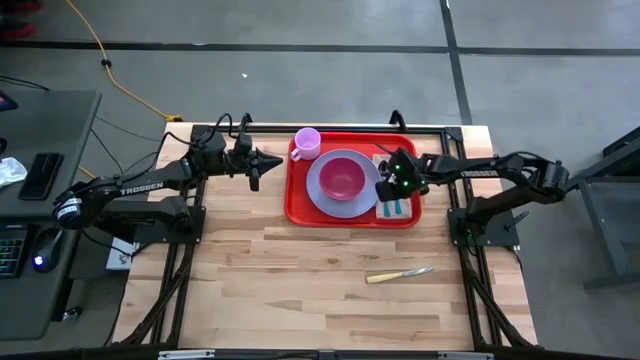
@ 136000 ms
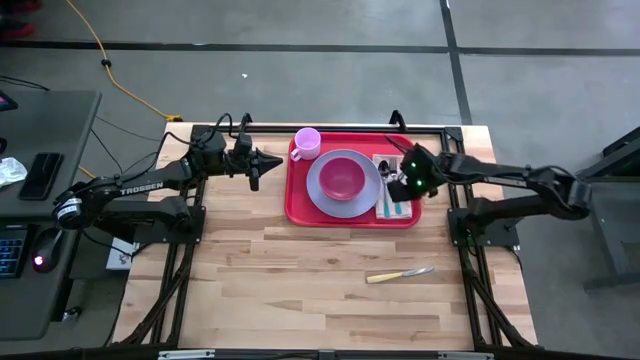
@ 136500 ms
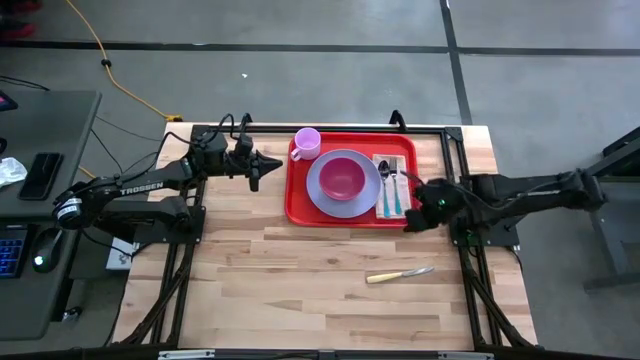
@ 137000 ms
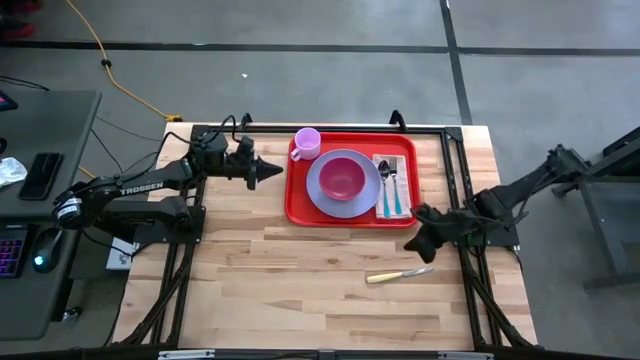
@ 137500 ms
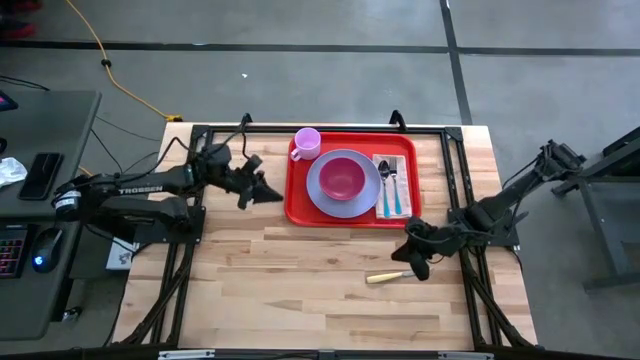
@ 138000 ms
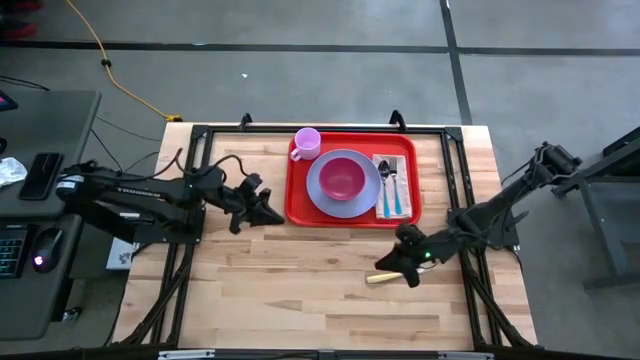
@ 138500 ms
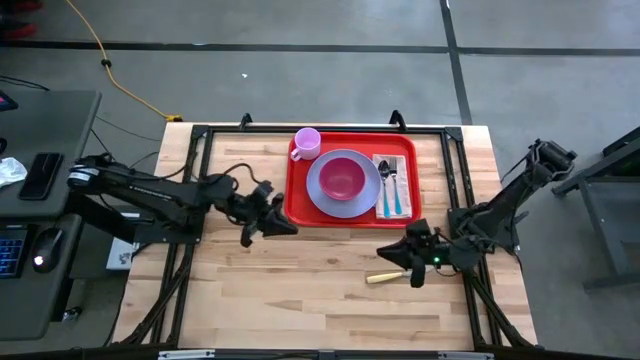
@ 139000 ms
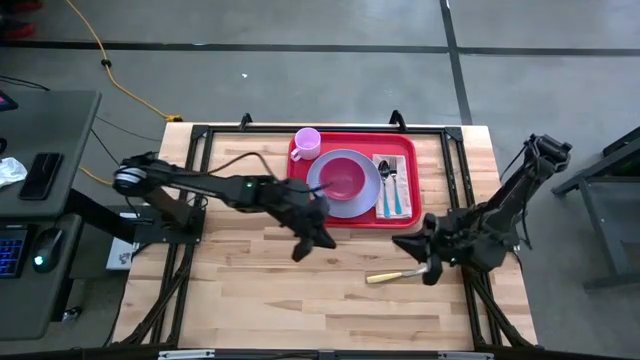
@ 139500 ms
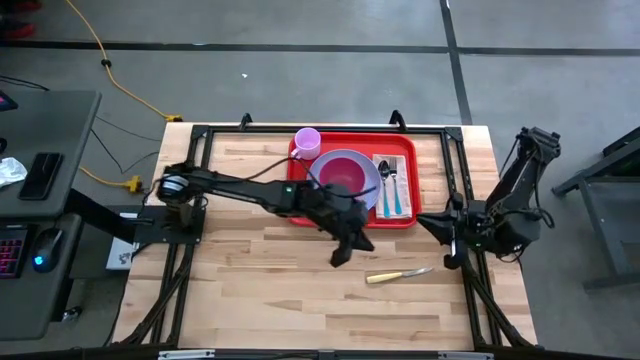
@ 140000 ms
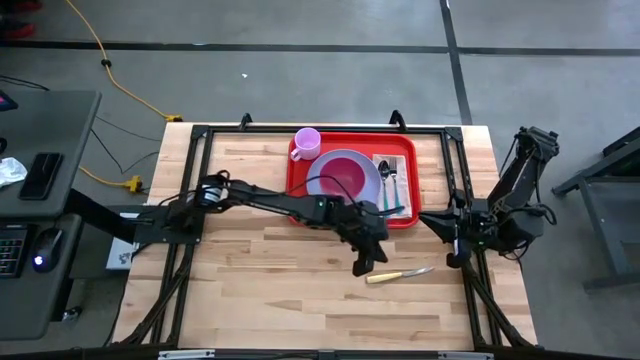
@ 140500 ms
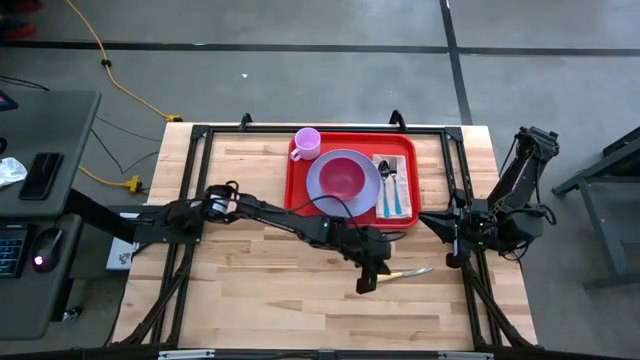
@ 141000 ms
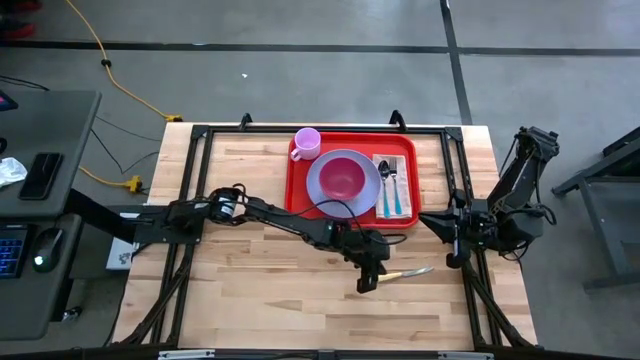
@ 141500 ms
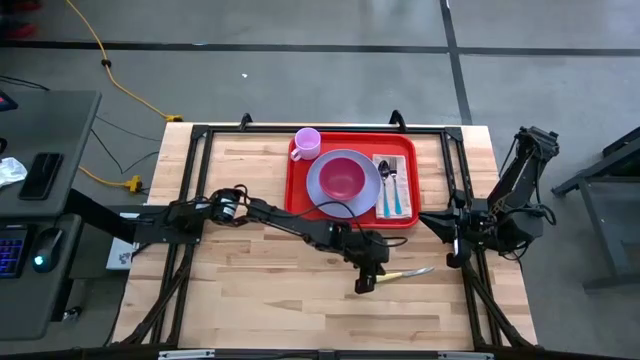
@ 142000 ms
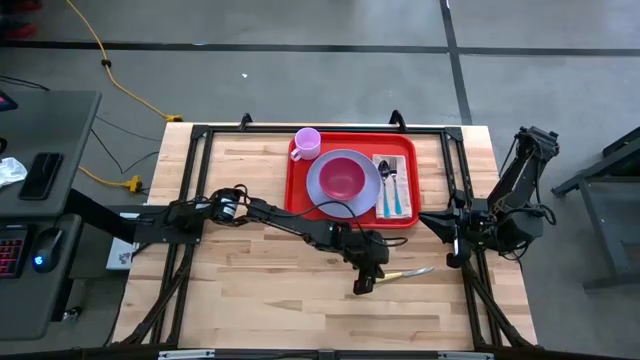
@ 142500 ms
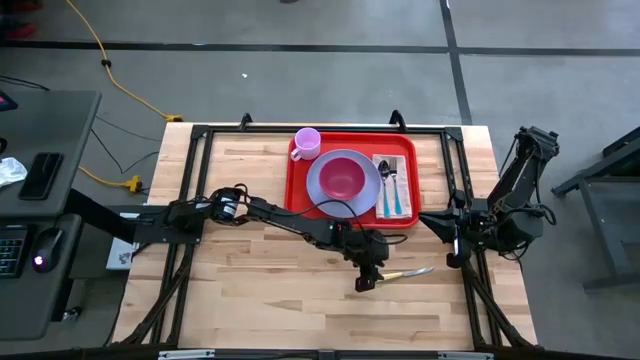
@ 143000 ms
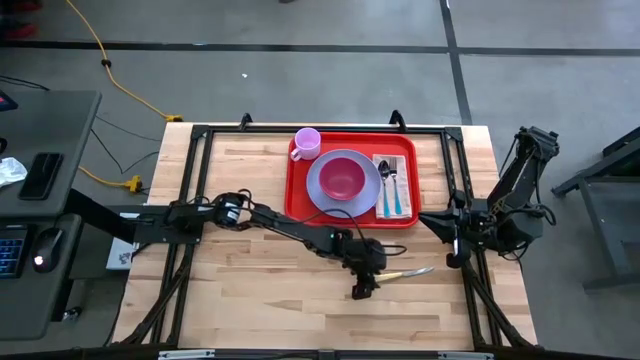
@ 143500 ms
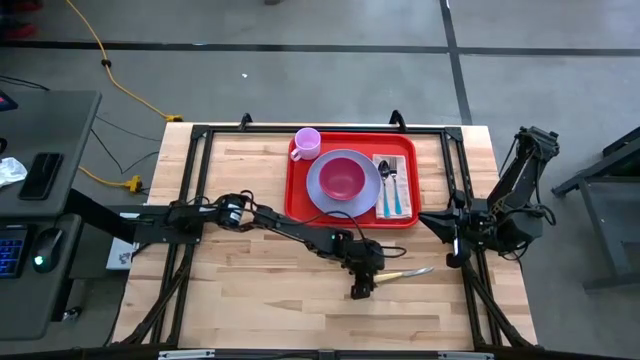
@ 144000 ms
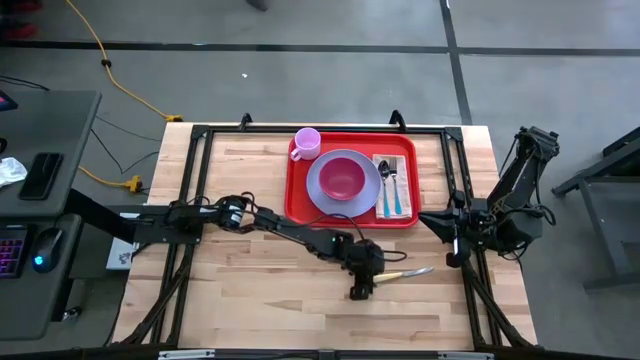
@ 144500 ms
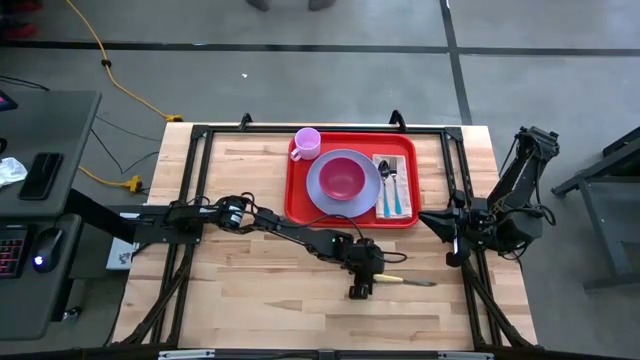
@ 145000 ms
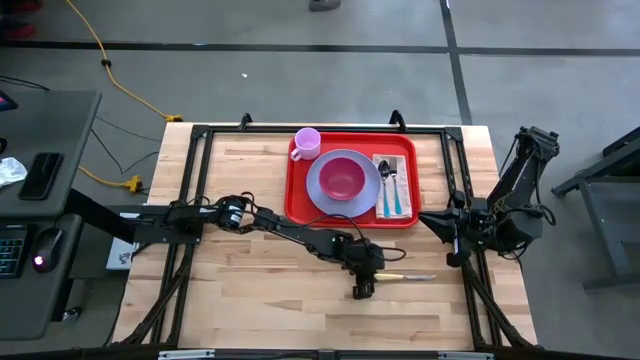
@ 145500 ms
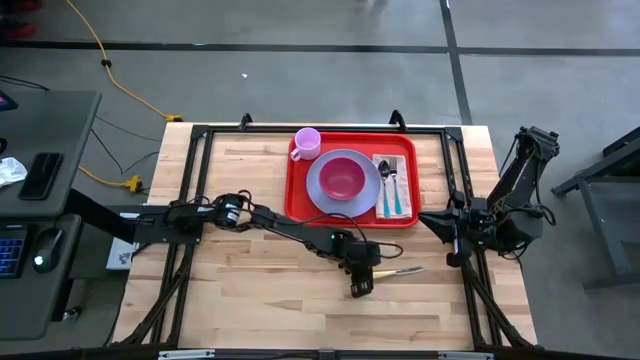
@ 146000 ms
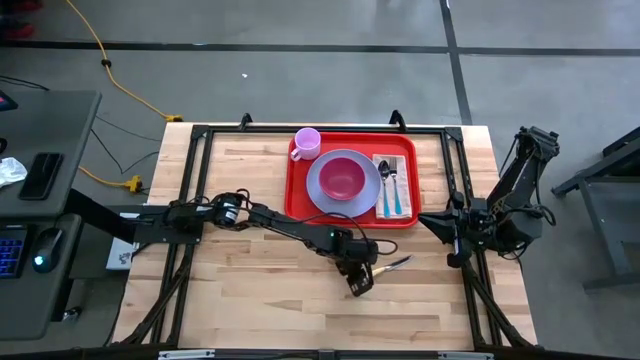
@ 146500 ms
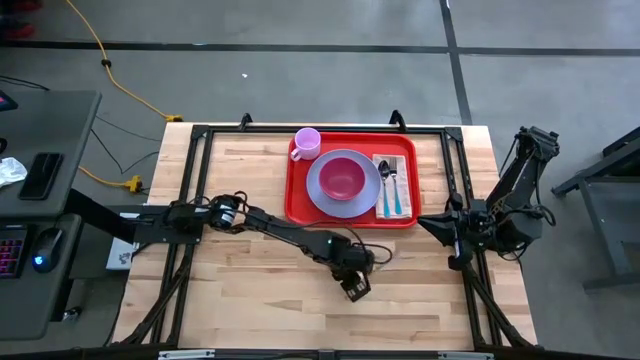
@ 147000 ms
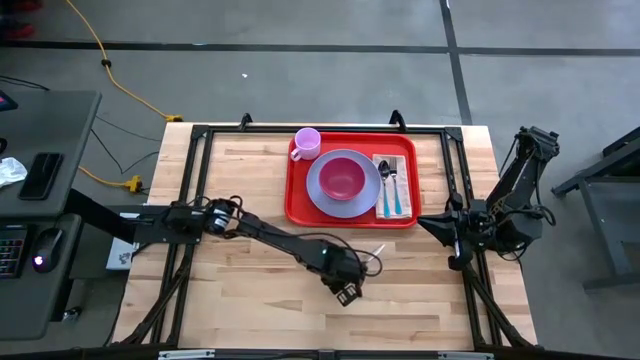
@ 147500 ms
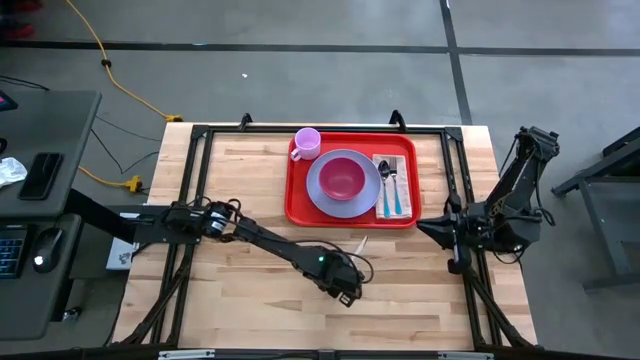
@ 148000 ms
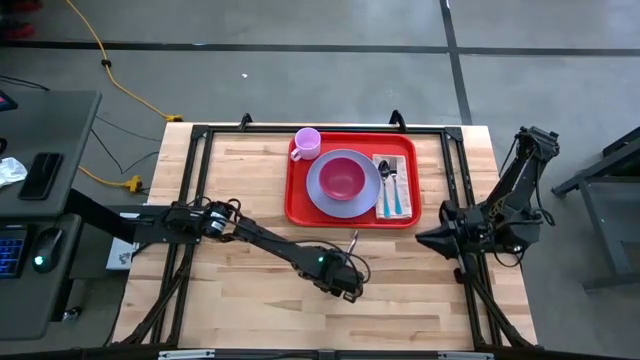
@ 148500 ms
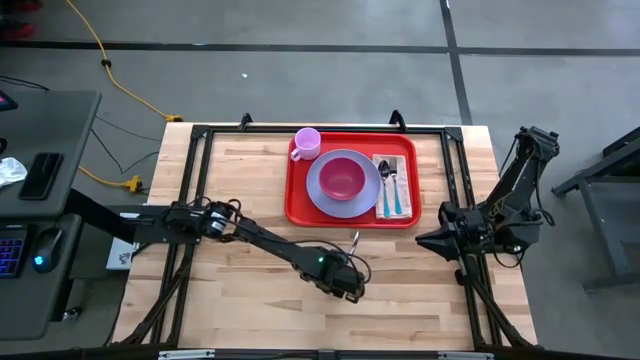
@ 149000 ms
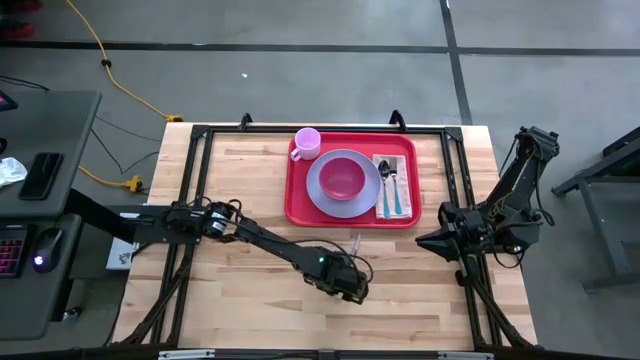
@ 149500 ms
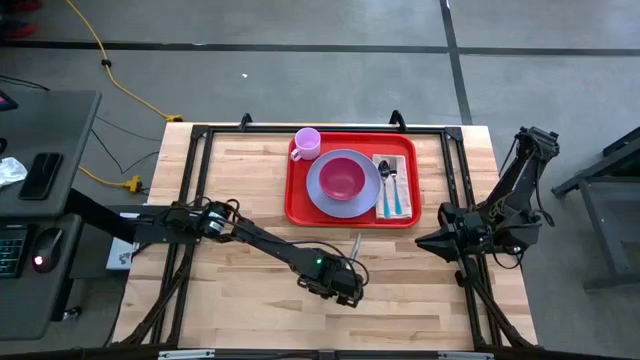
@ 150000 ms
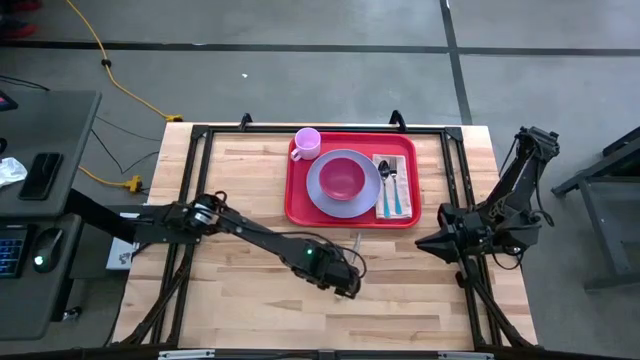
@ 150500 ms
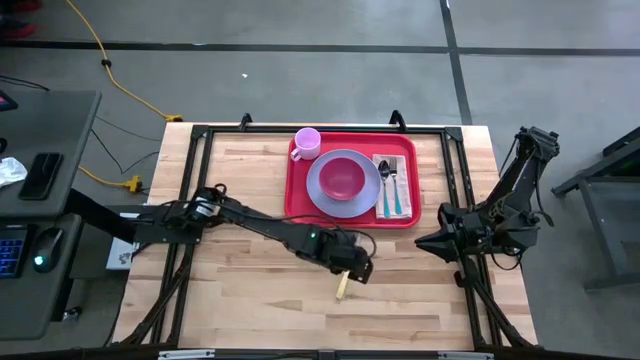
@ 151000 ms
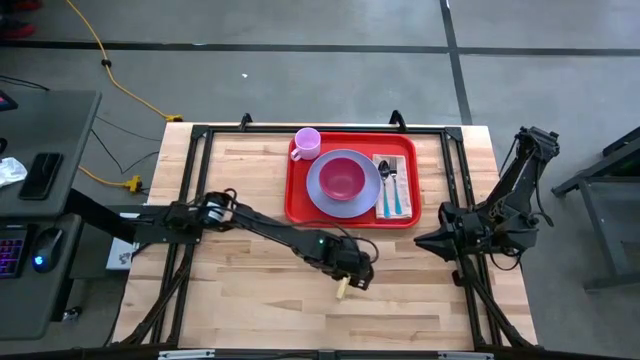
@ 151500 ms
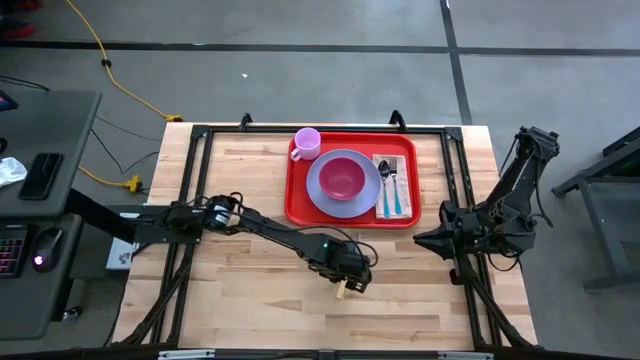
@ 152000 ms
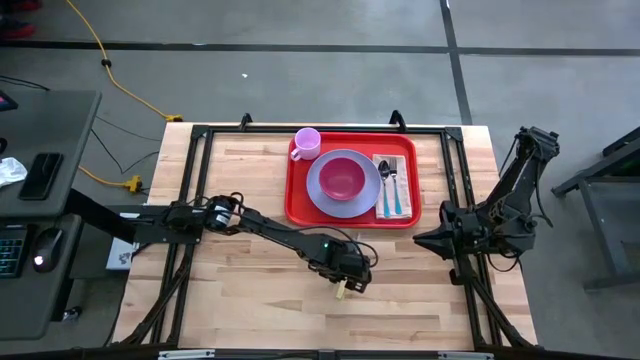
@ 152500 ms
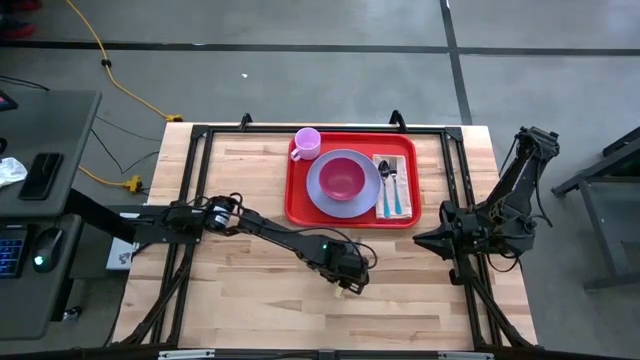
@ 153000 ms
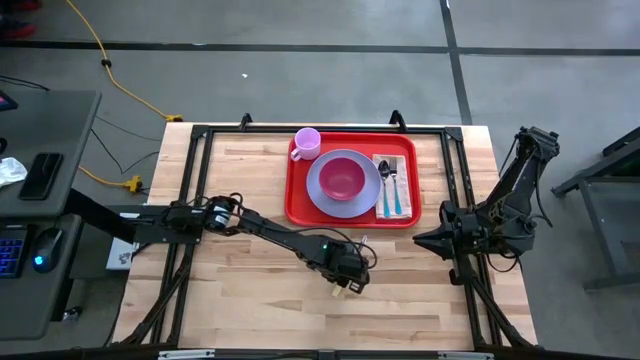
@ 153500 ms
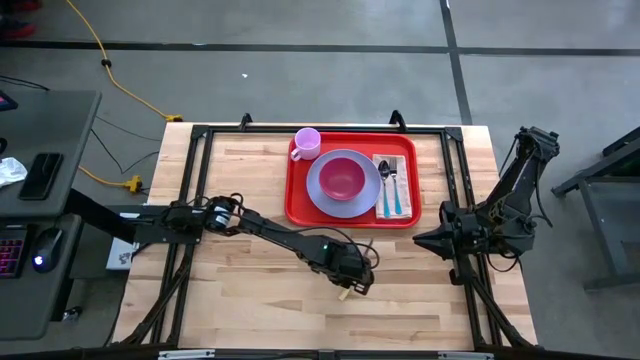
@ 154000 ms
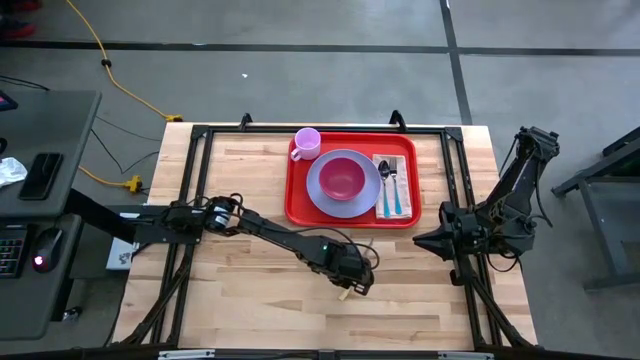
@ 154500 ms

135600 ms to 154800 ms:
Task: Set up tray
Put the knife to the right of the blue fork on the white napkin on the serving tray
